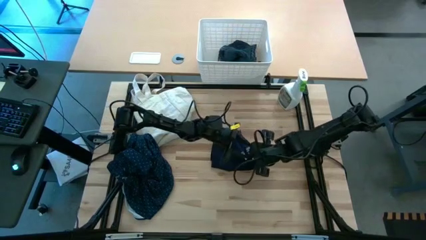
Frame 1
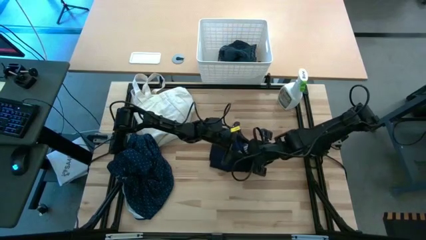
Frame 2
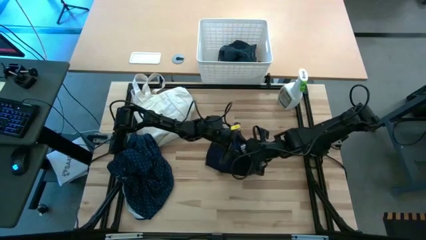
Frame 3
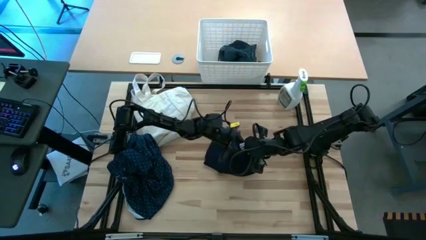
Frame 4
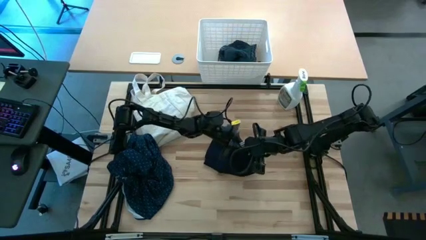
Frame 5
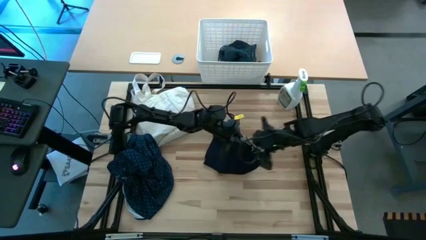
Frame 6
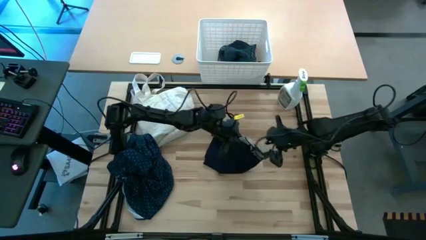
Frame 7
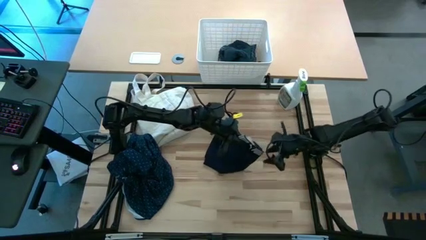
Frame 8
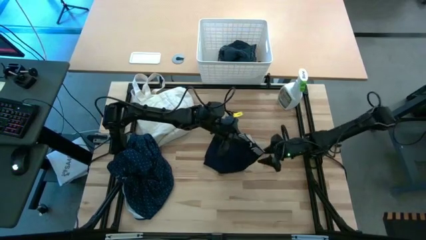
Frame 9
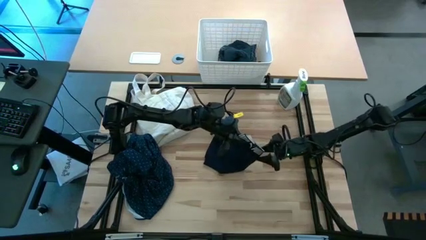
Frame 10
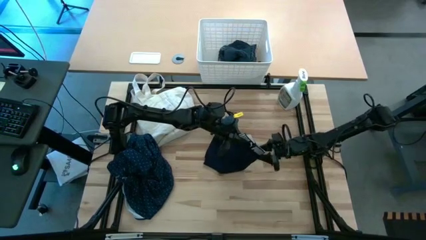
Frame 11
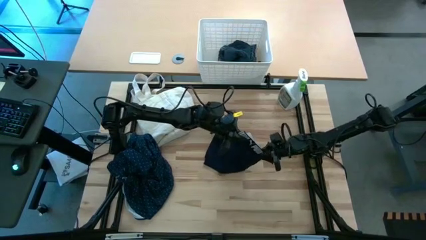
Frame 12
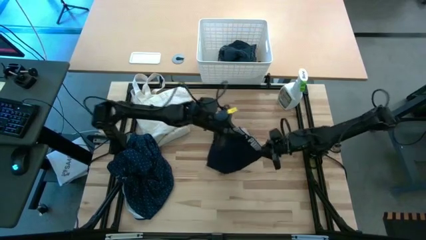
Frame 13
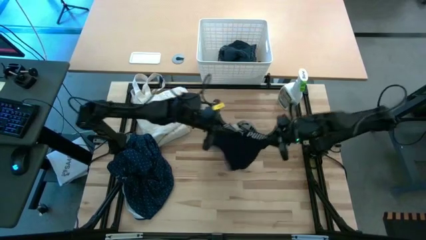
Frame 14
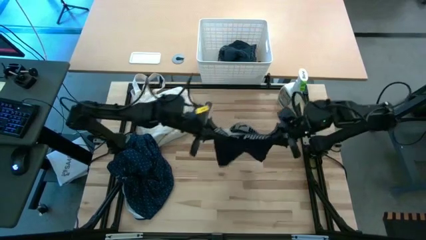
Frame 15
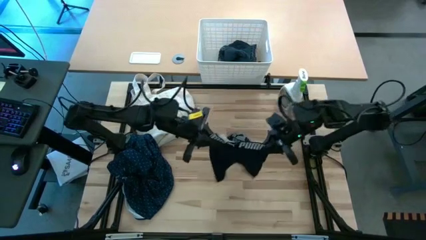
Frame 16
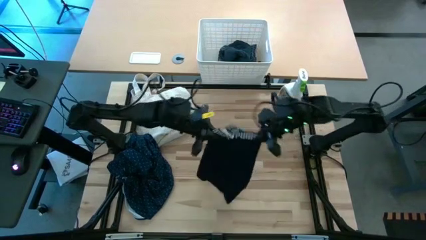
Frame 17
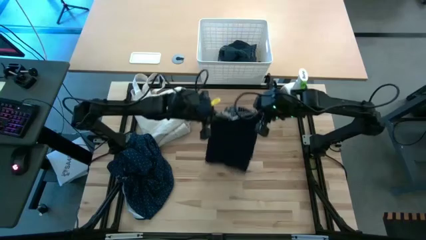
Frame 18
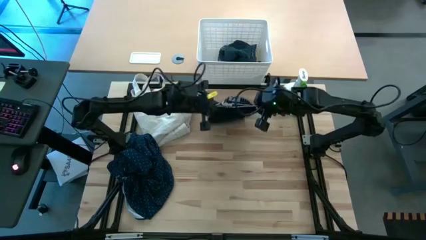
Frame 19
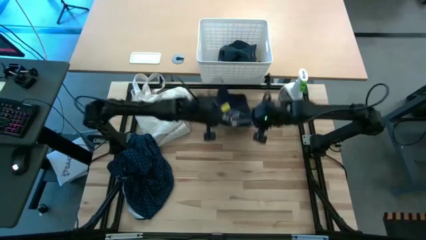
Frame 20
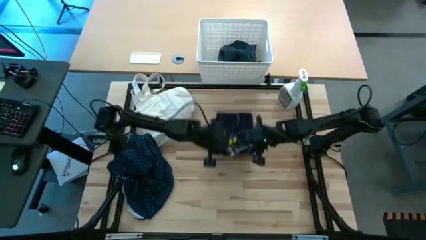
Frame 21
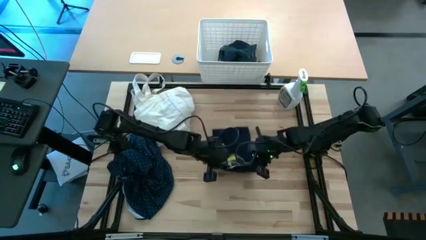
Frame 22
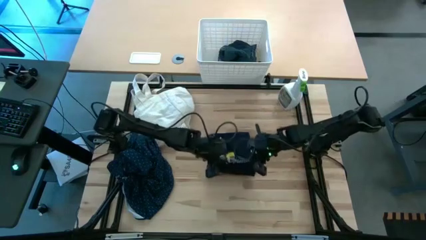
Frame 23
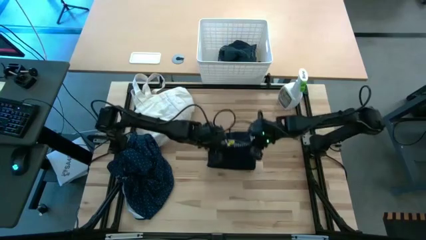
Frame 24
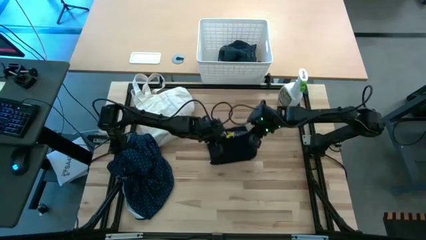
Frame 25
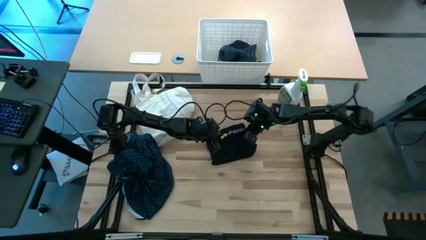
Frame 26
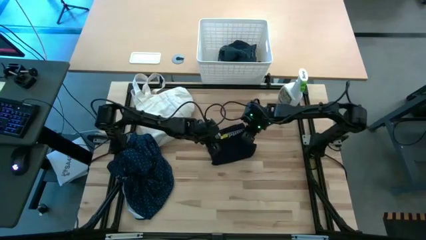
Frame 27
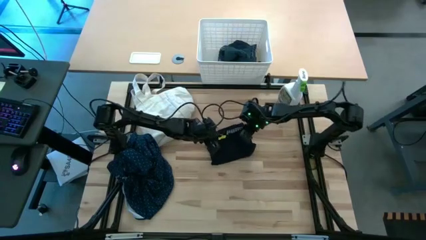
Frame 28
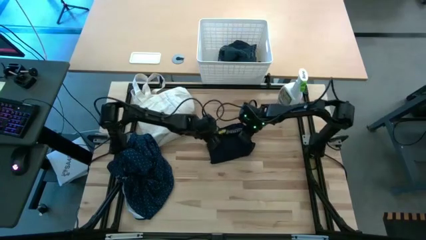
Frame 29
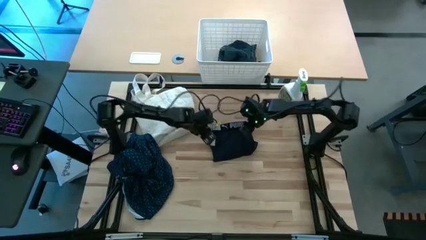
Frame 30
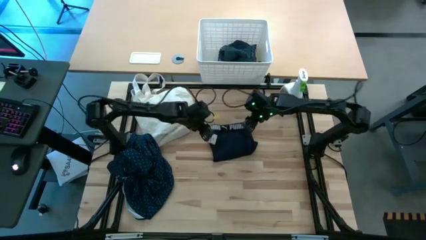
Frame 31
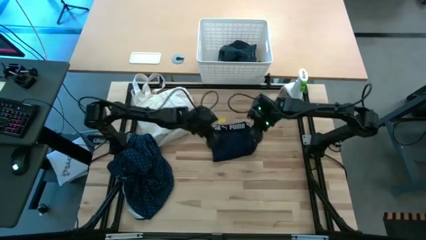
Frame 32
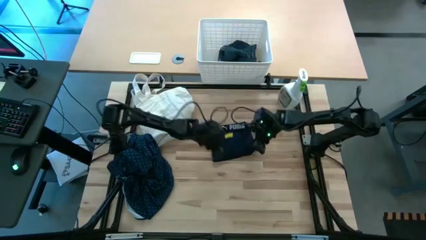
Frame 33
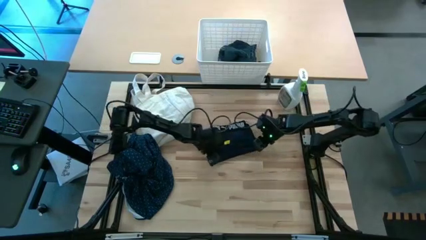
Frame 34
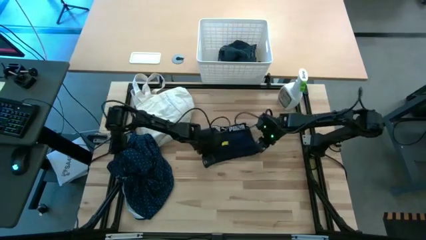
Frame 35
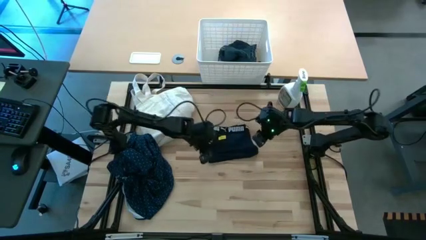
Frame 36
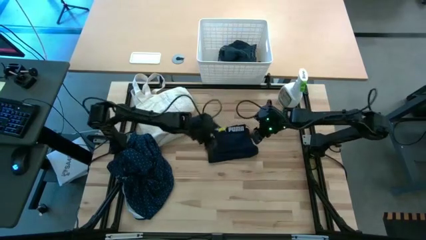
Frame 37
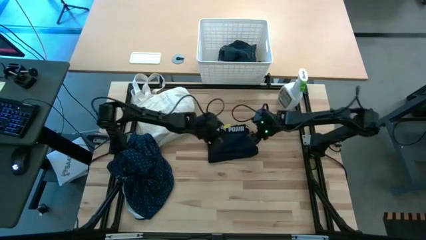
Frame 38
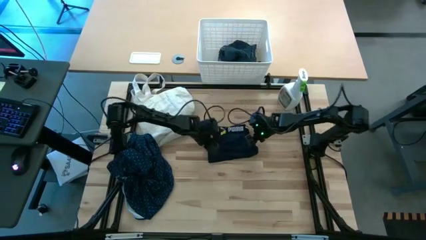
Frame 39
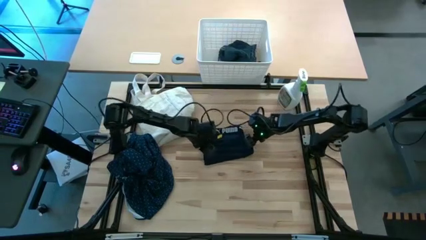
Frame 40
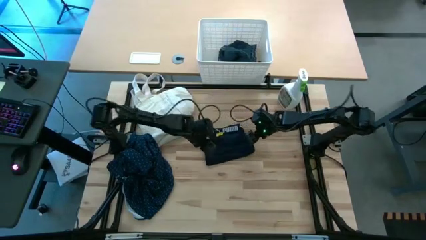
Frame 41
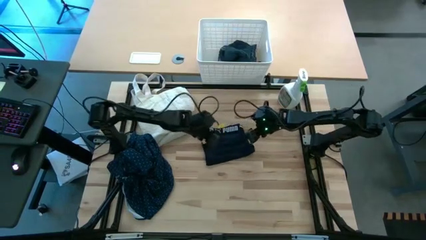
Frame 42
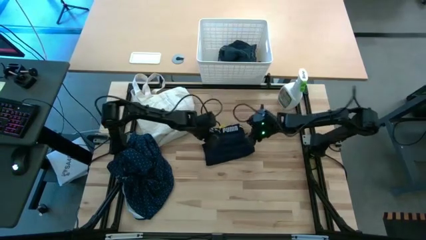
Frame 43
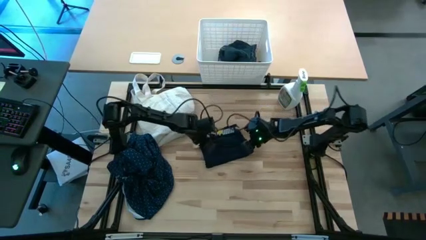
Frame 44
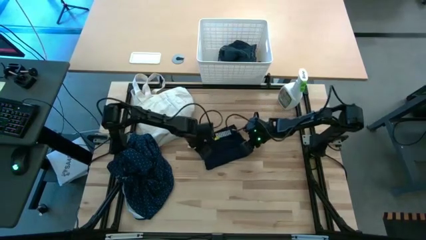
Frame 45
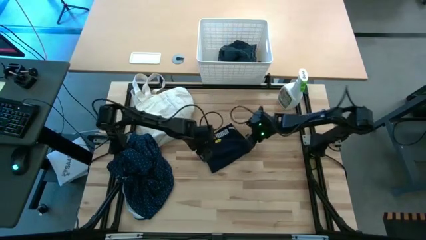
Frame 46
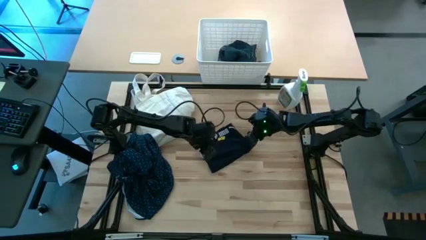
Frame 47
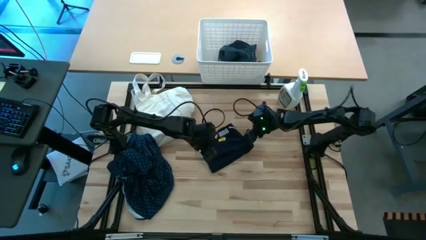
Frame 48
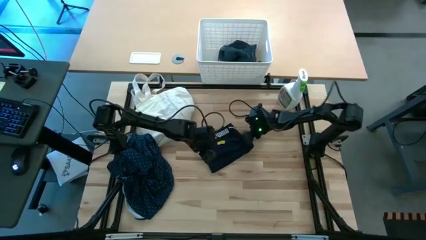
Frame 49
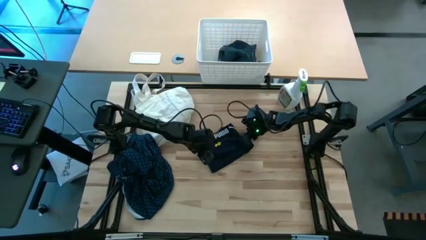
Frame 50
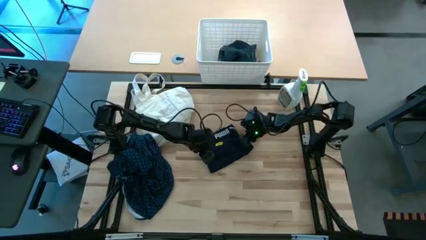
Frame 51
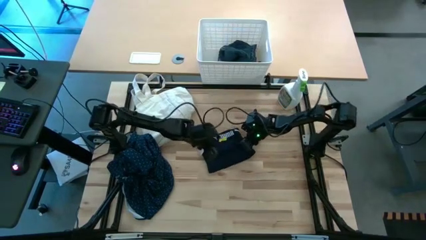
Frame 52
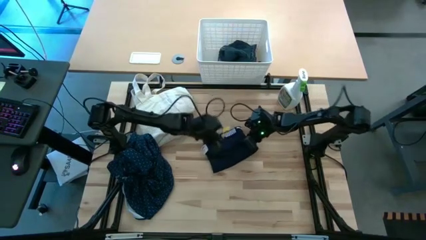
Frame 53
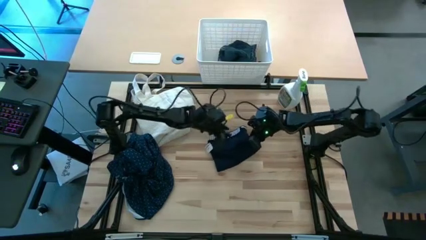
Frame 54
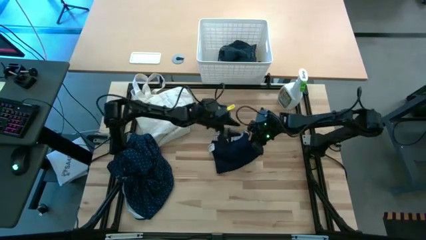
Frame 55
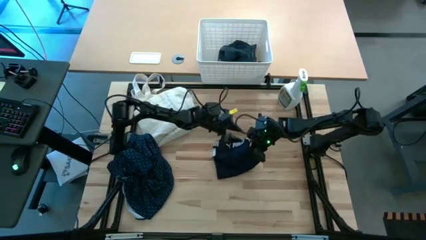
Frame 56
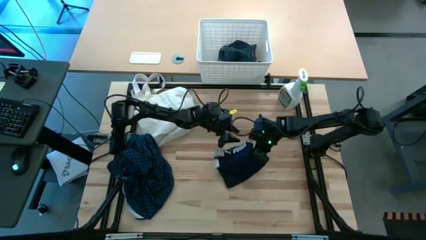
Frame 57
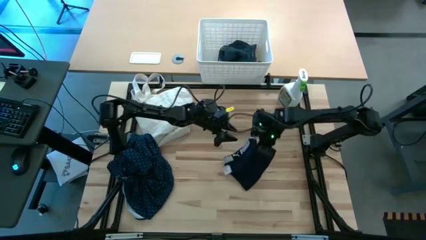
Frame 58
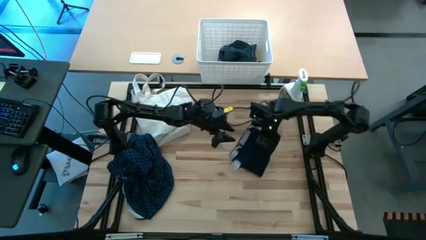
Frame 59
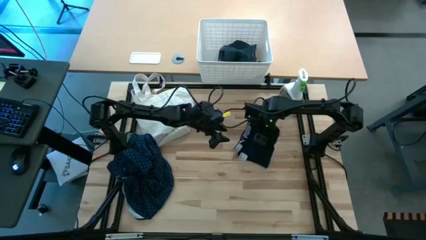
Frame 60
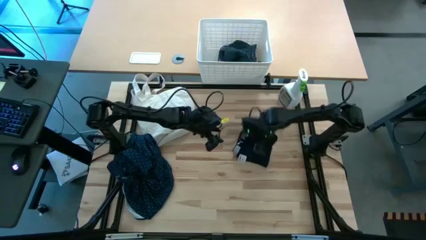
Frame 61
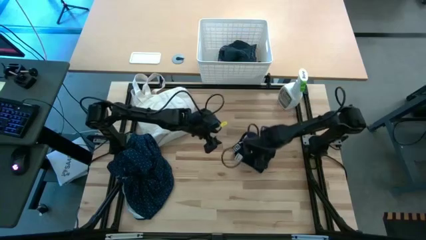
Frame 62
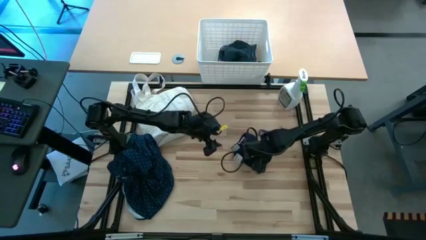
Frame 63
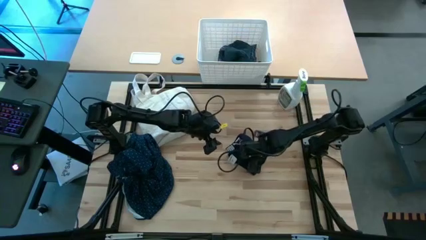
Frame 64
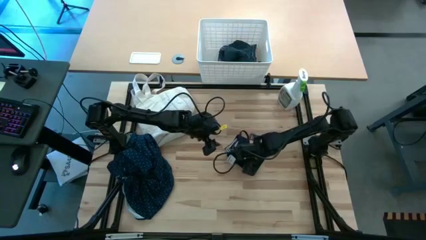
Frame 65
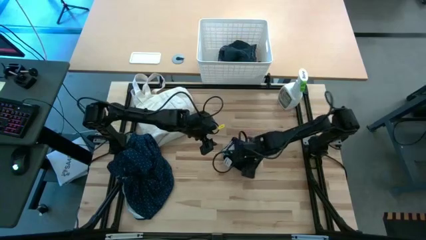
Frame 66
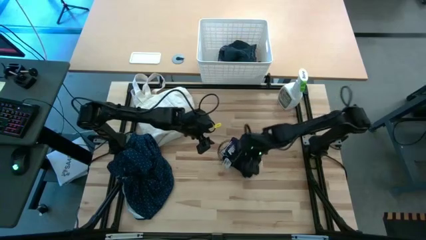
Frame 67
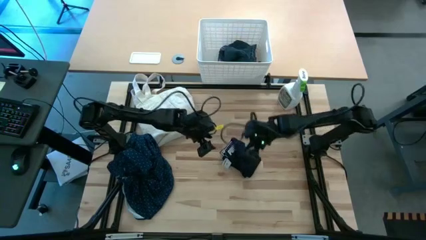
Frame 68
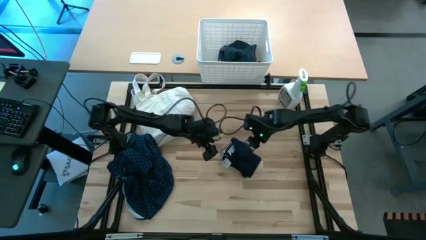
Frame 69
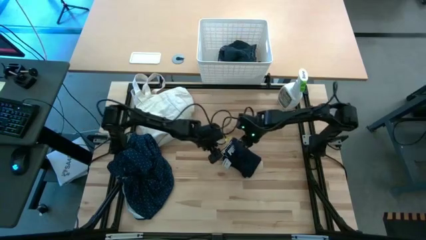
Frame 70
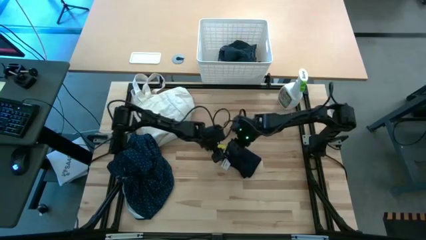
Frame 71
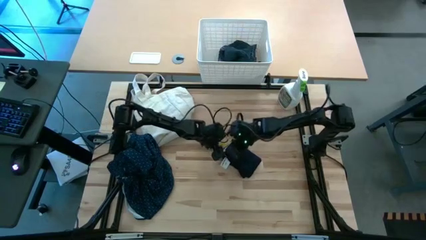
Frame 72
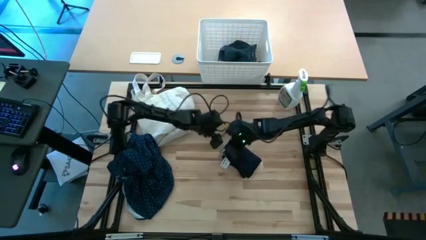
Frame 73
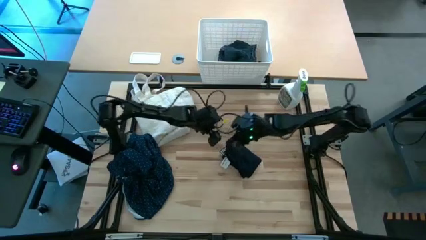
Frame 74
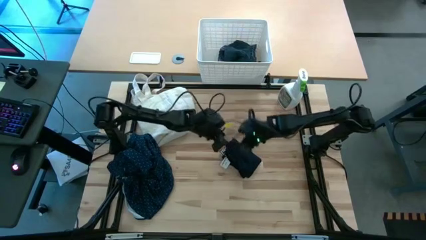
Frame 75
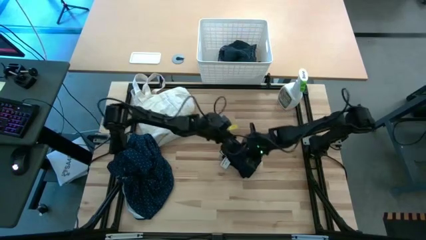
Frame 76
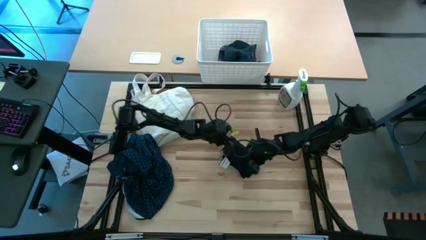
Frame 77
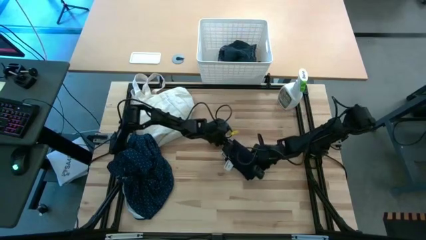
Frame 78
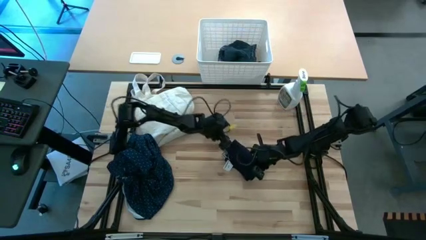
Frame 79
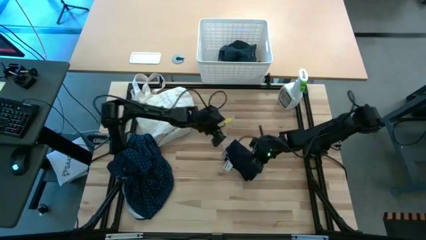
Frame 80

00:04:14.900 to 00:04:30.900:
Fold the black boxer short
